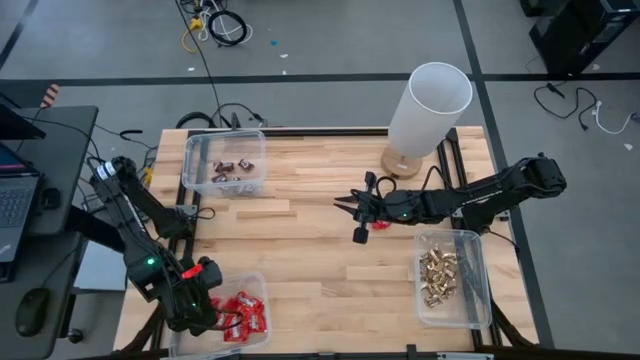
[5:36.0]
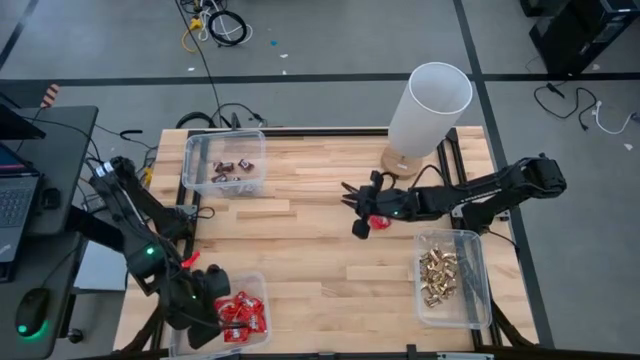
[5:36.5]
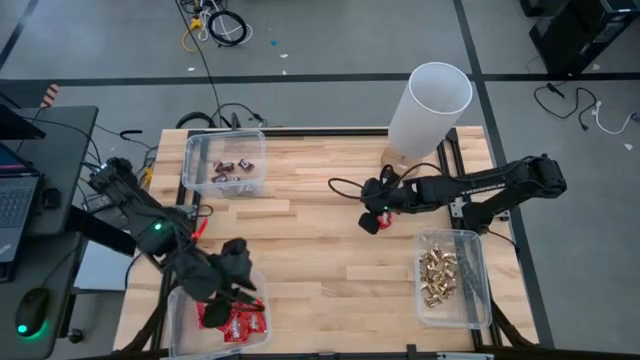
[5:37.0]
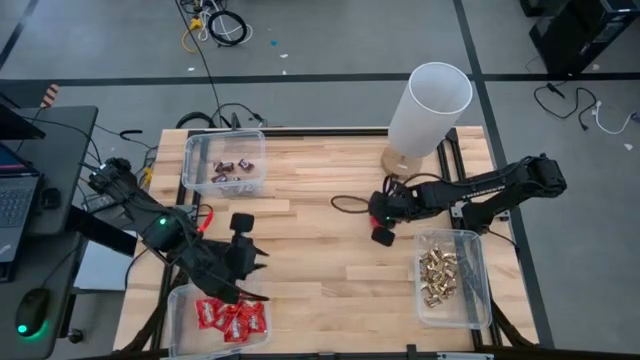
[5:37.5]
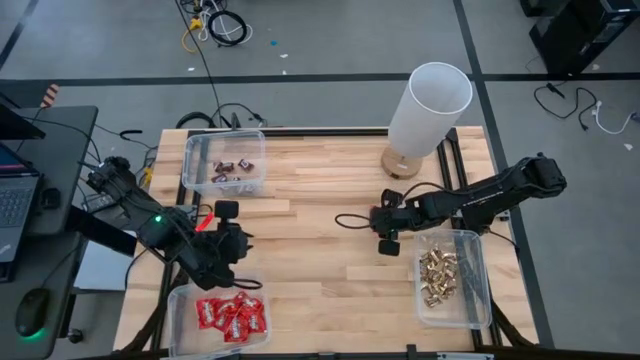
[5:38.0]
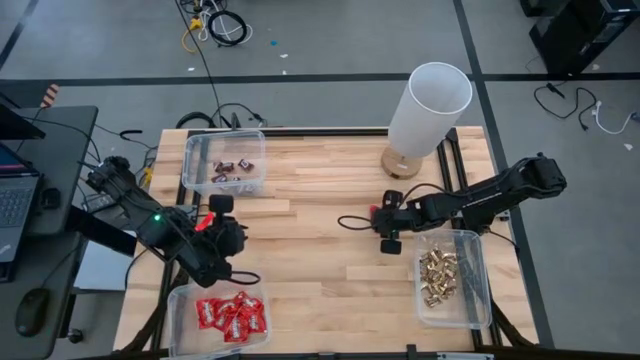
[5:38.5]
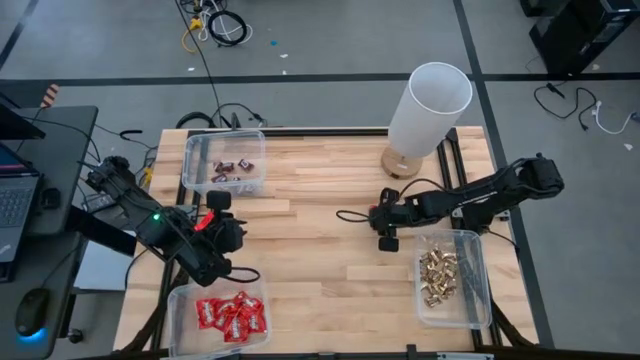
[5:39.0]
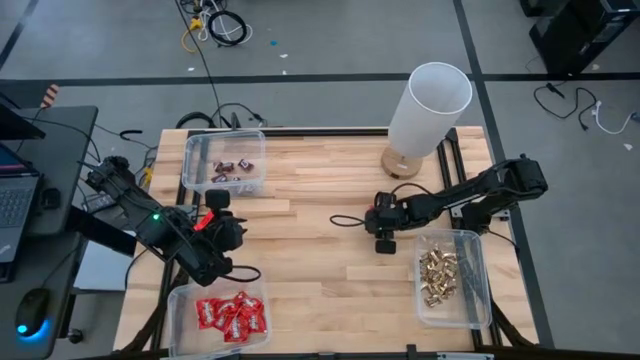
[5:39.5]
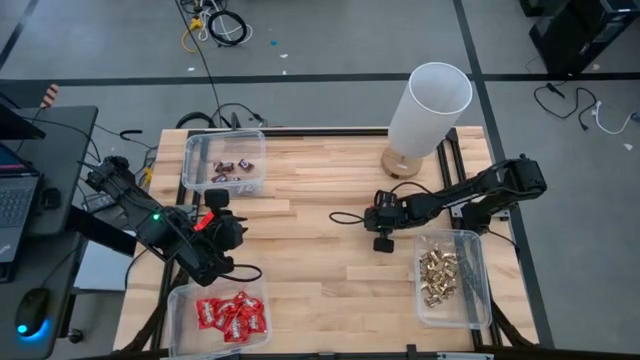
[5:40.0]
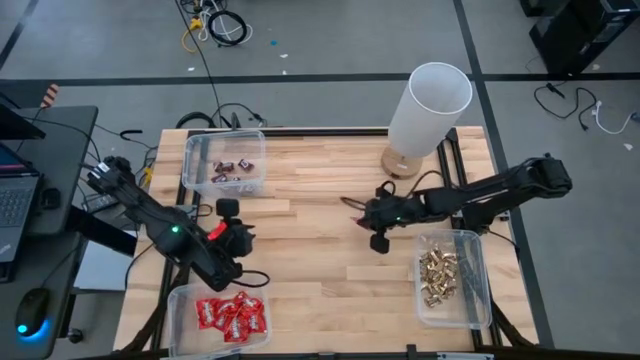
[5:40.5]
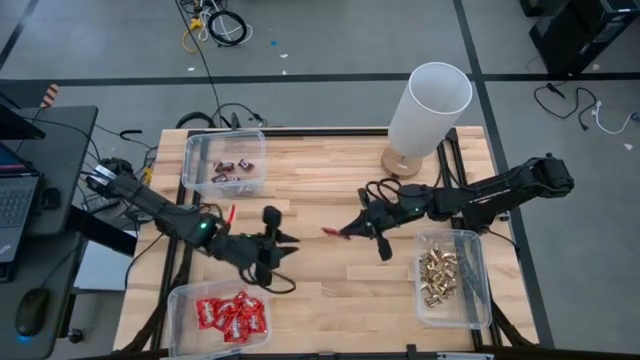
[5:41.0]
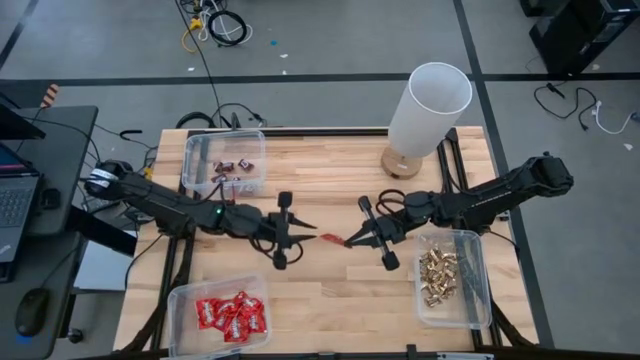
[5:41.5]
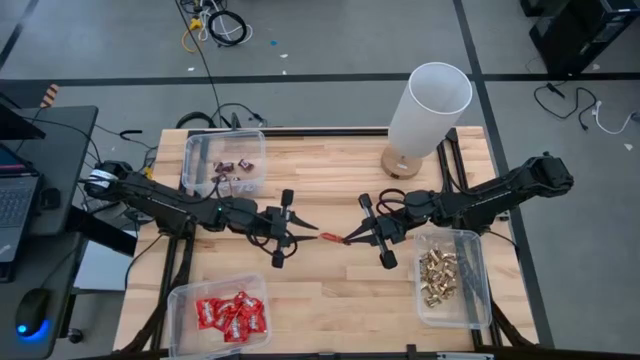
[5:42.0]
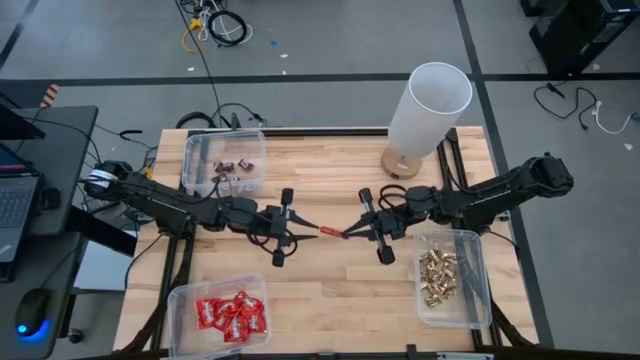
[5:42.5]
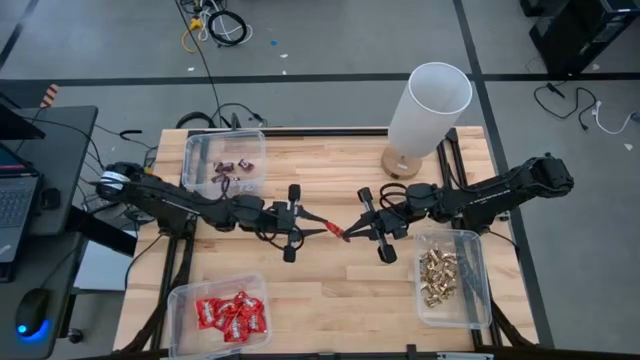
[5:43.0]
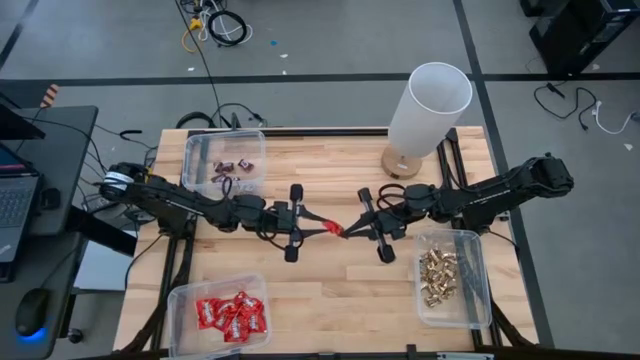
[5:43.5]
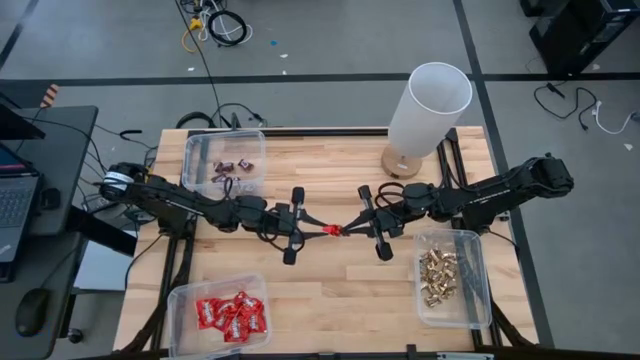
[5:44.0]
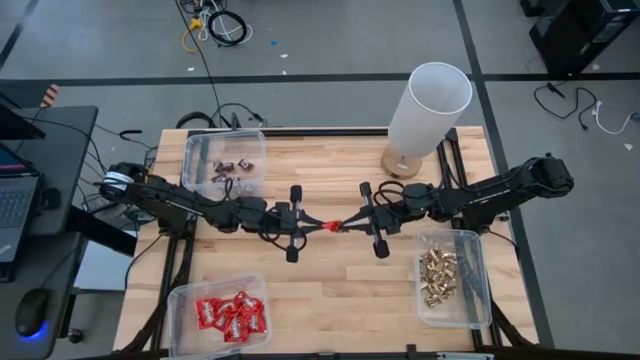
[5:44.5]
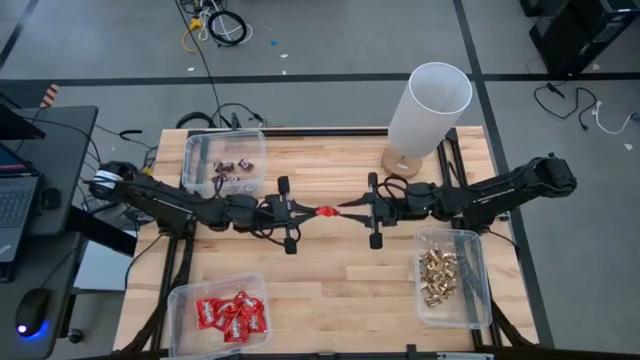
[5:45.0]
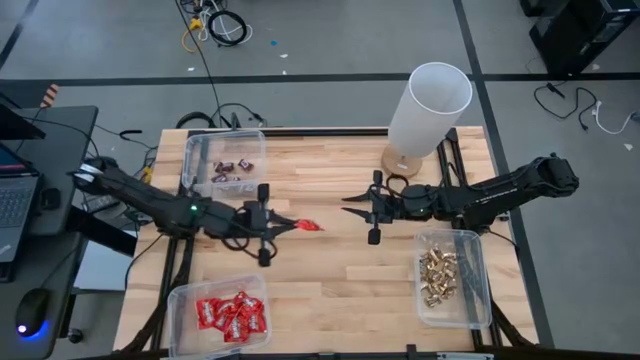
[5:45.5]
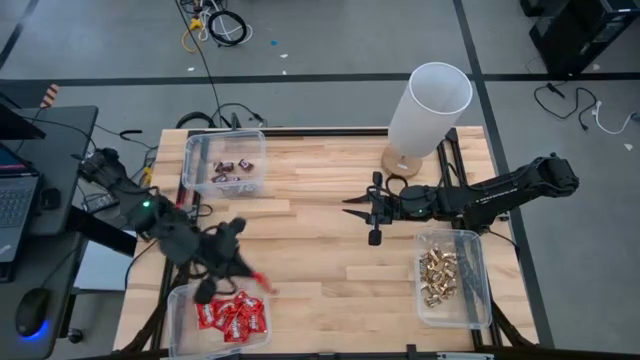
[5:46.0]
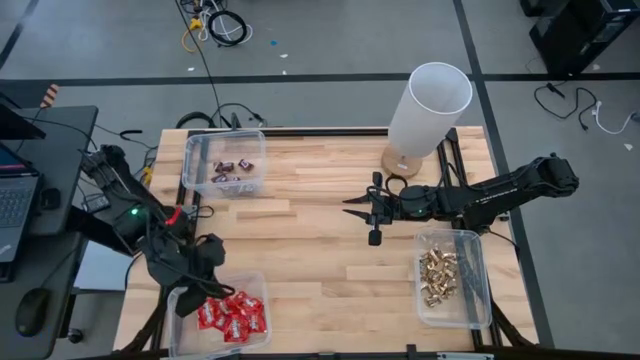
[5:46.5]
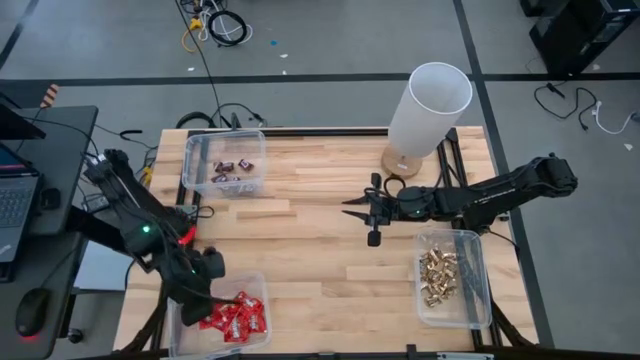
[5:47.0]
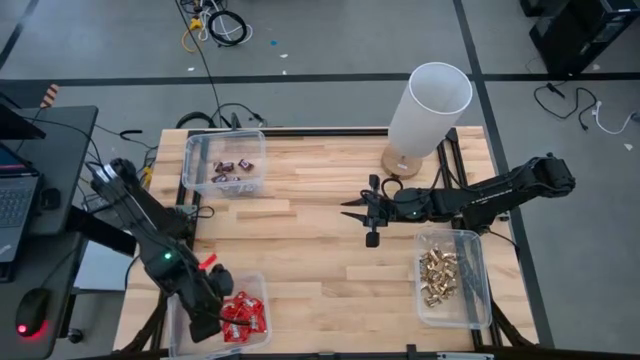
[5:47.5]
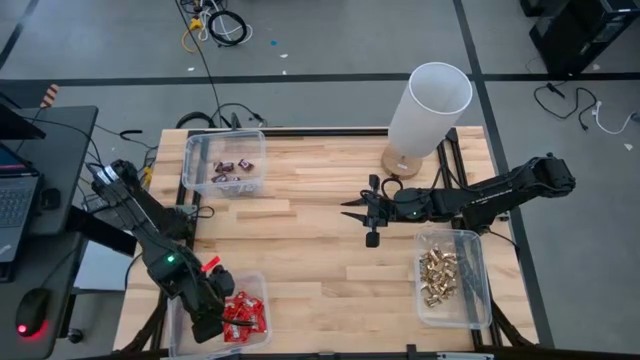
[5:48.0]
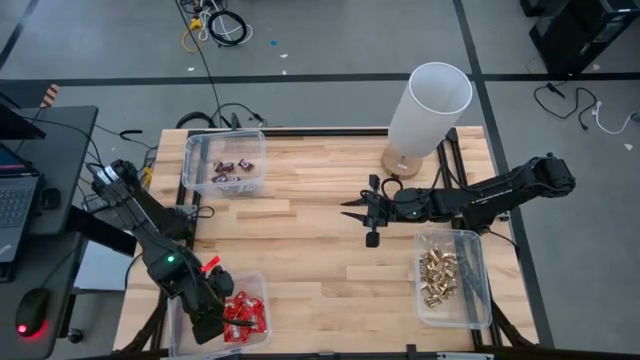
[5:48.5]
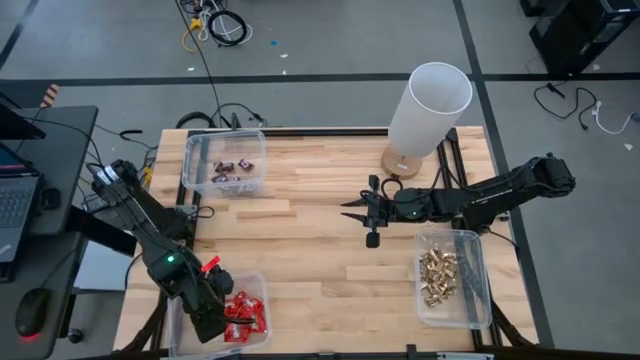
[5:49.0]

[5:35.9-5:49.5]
Task: Sort candy
Put the red chocolate into the bottom left transparent bin
